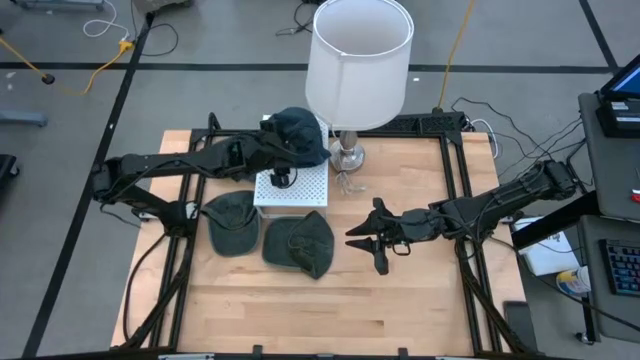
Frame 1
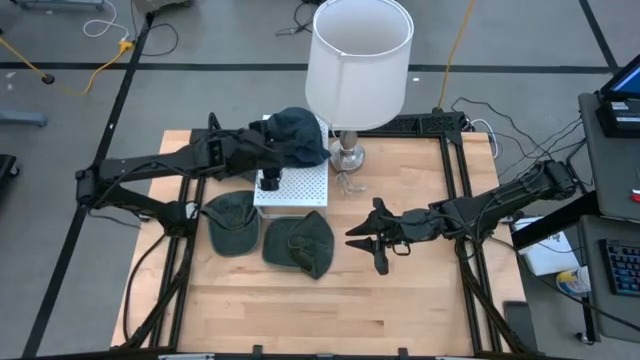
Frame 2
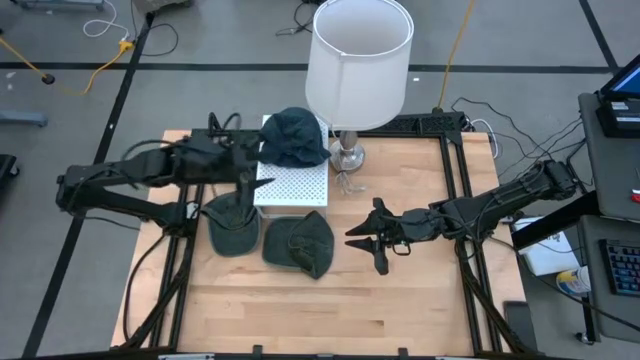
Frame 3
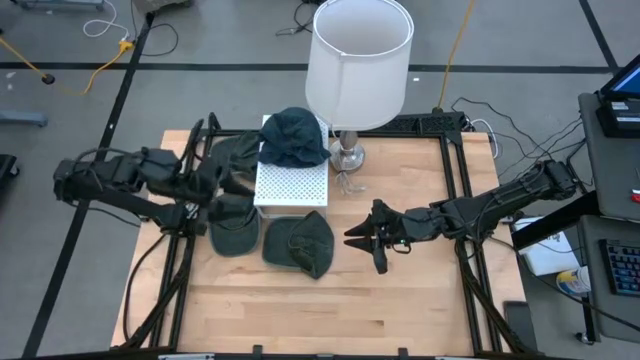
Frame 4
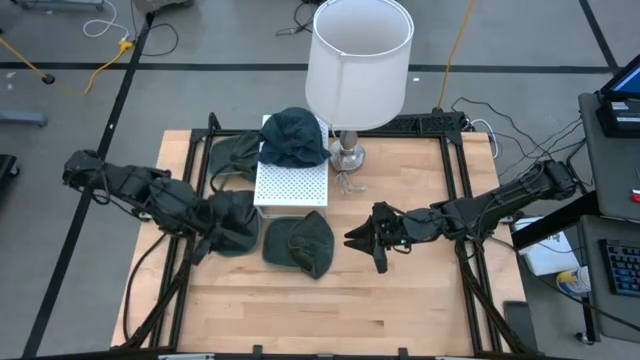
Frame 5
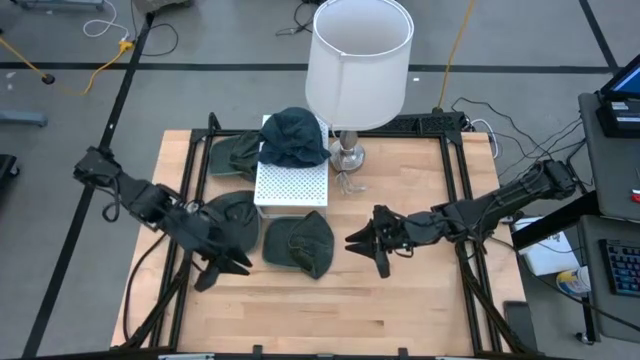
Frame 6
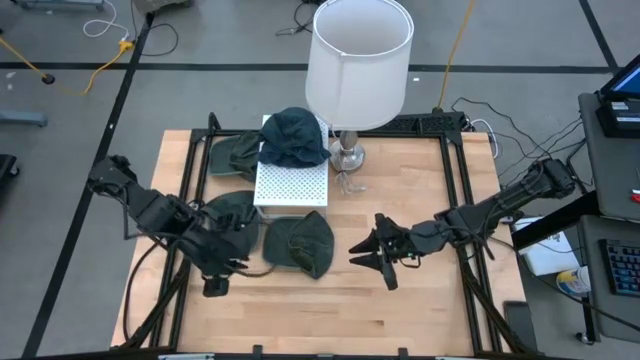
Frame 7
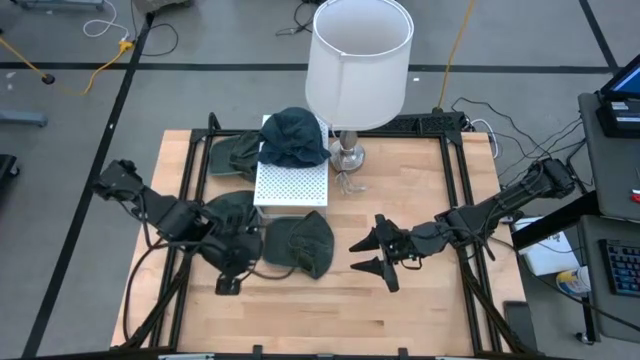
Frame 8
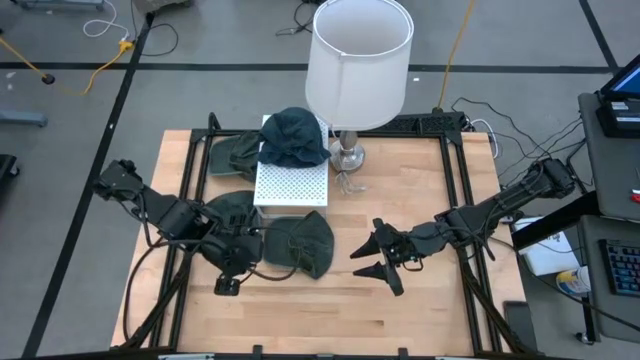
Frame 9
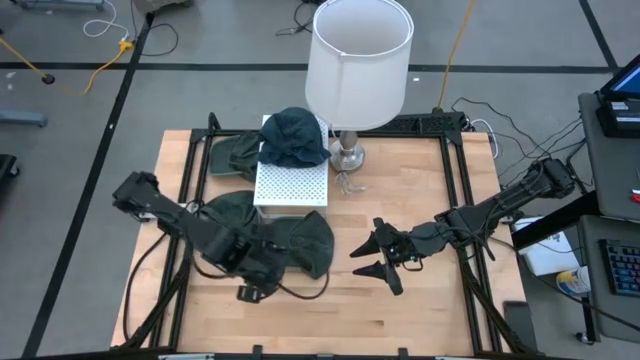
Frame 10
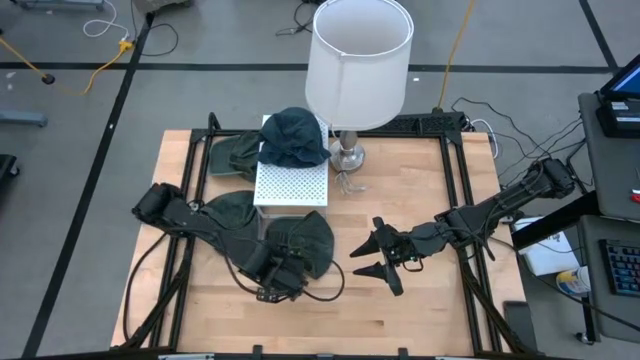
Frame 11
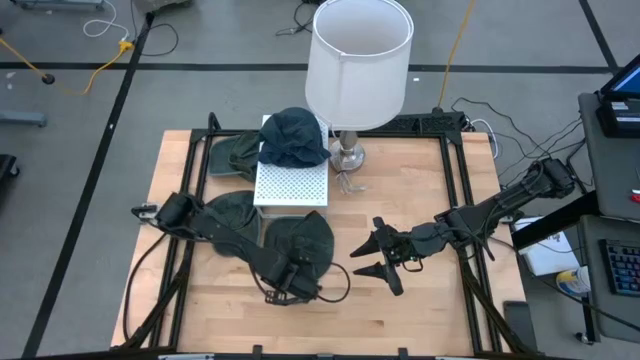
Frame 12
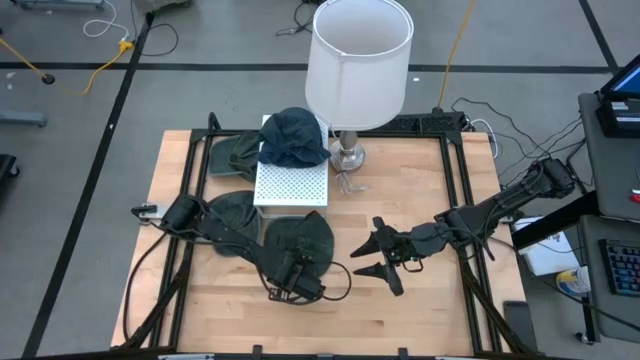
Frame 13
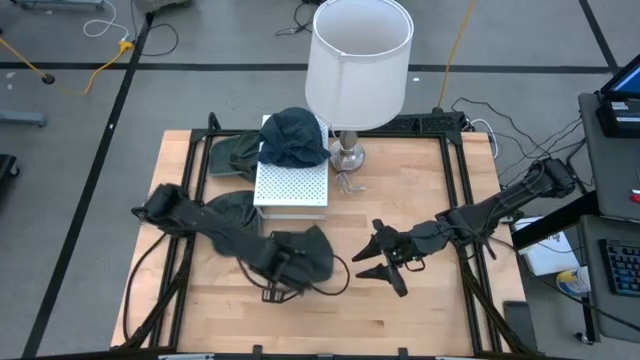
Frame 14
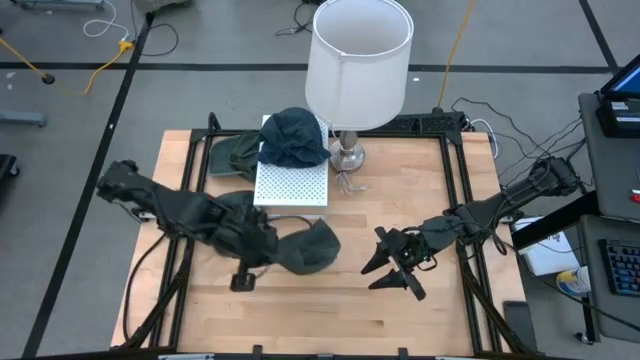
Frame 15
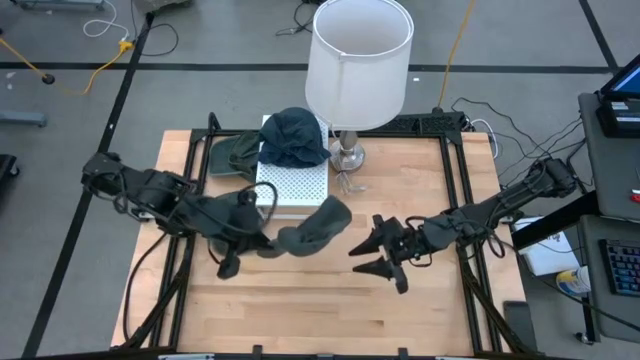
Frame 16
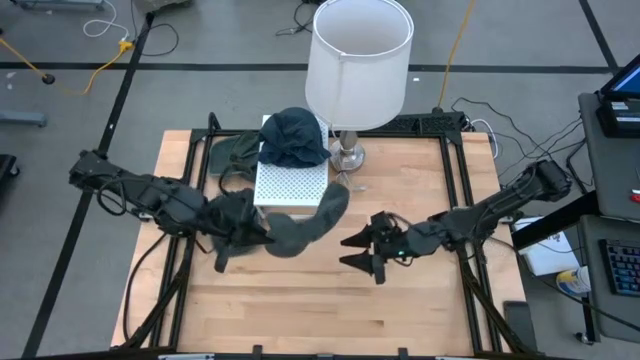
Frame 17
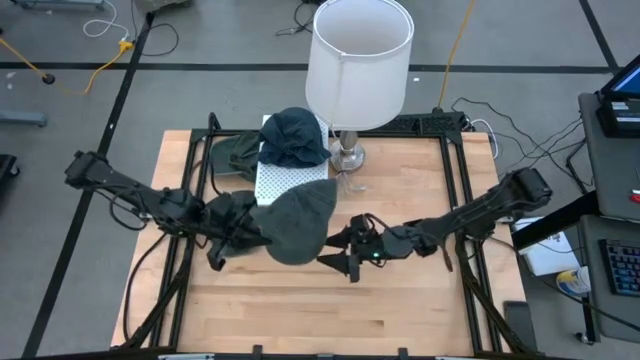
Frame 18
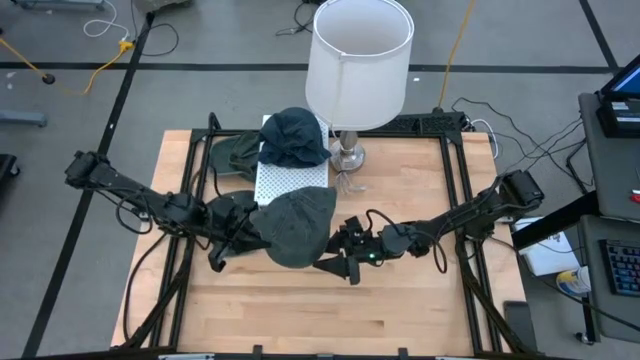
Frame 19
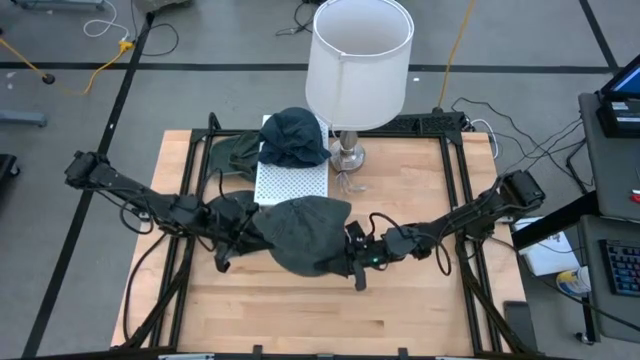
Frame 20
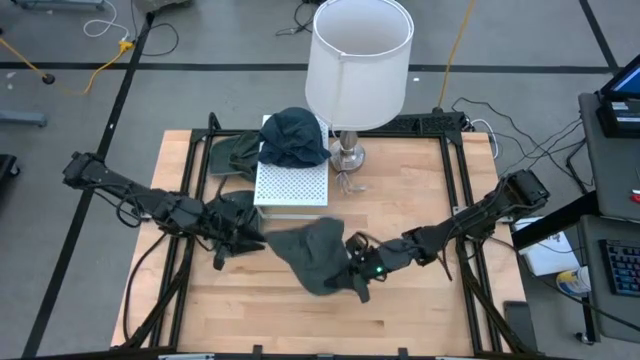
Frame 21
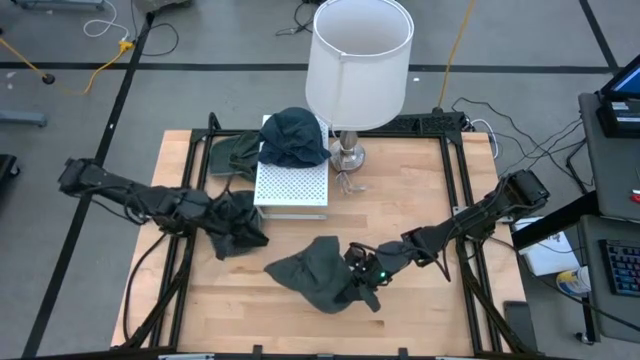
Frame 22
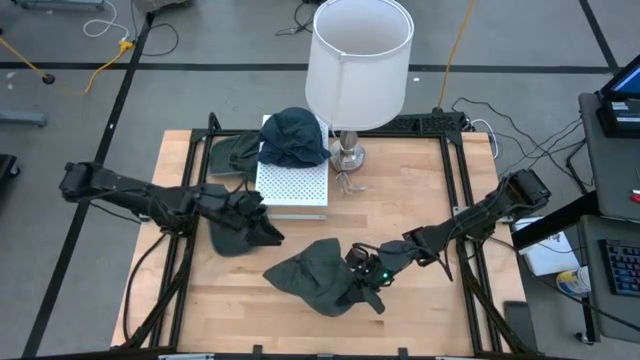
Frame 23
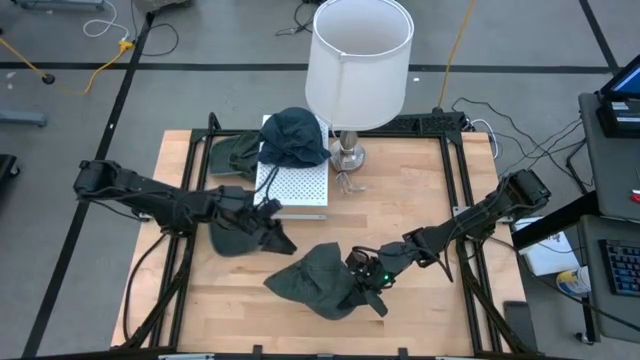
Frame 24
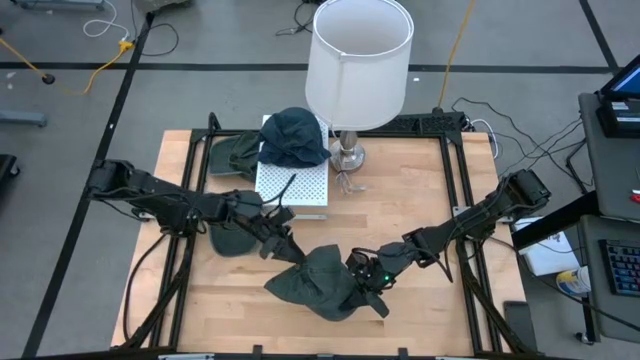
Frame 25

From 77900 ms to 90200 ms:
Task: Pick & Place hat
Put the bottom right gray cap on the shelf

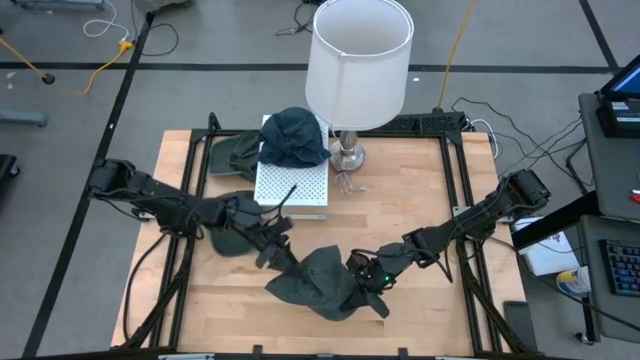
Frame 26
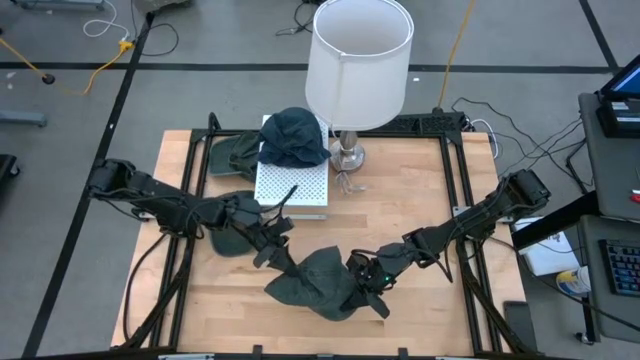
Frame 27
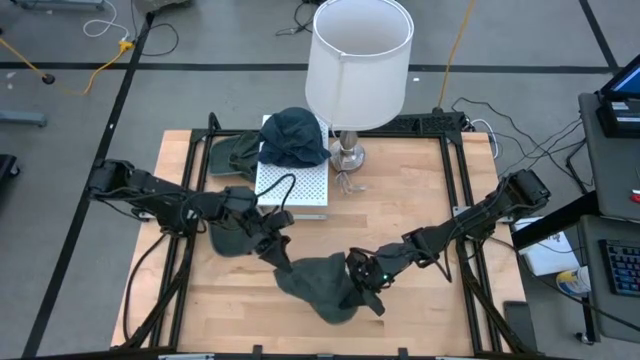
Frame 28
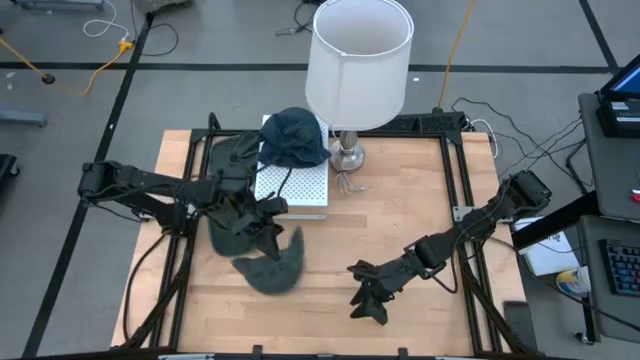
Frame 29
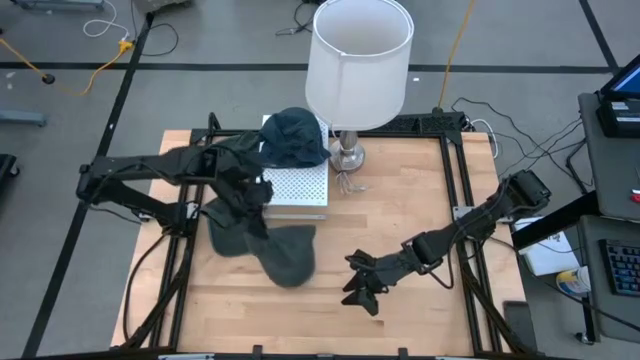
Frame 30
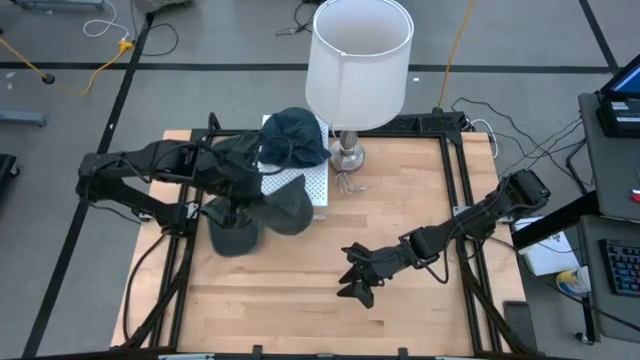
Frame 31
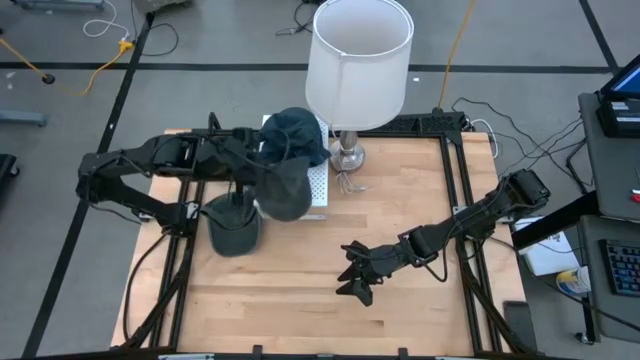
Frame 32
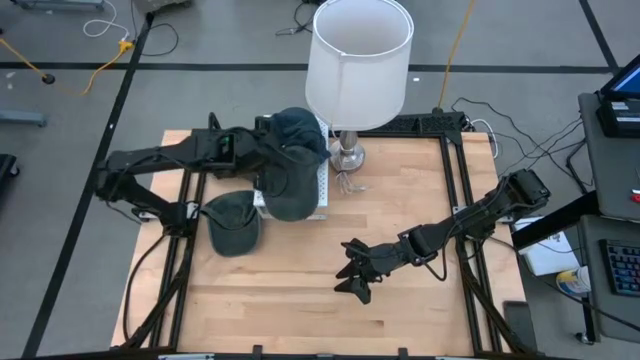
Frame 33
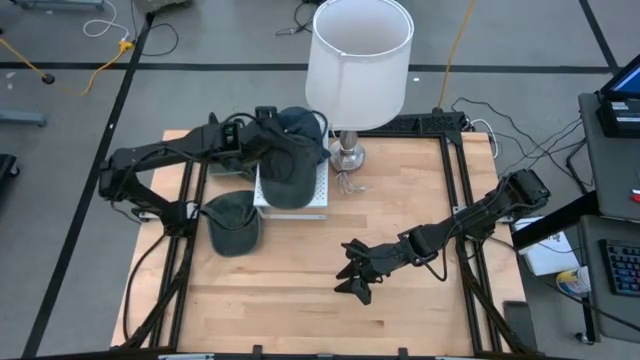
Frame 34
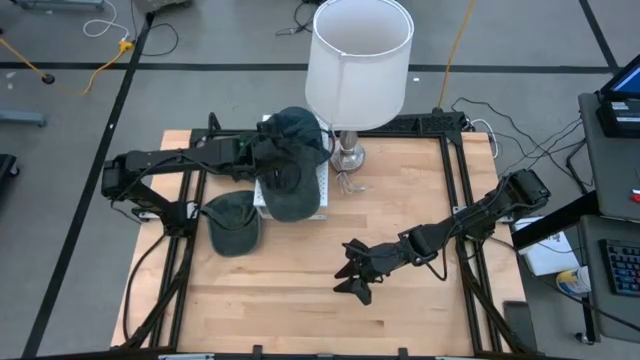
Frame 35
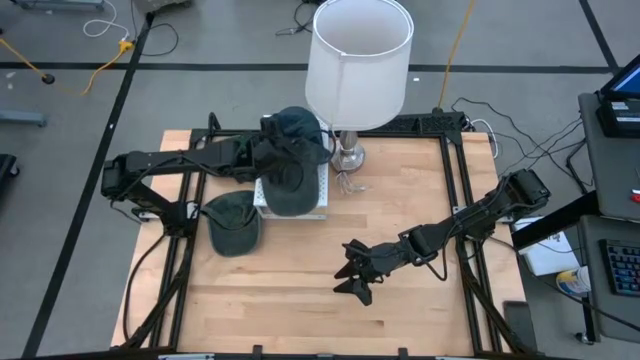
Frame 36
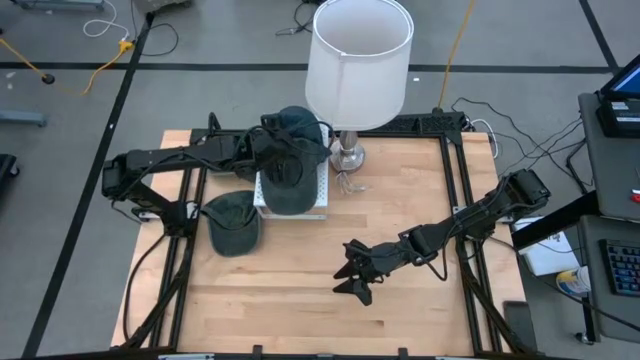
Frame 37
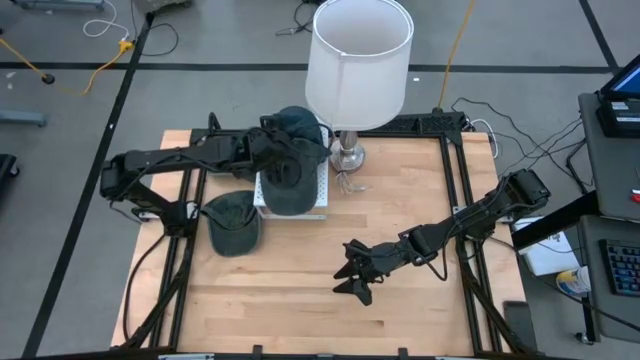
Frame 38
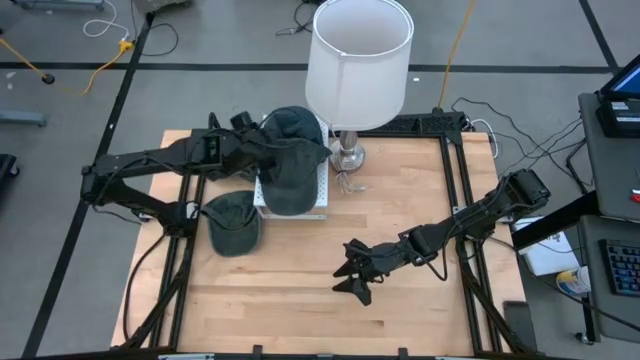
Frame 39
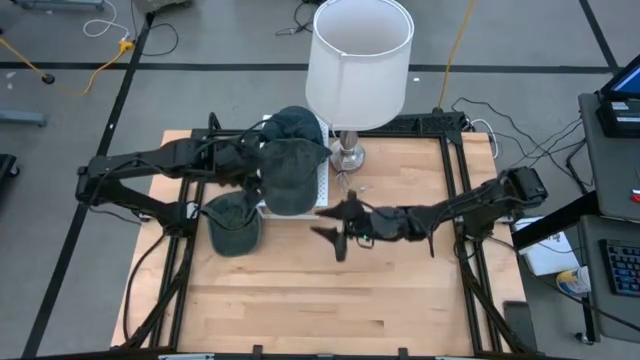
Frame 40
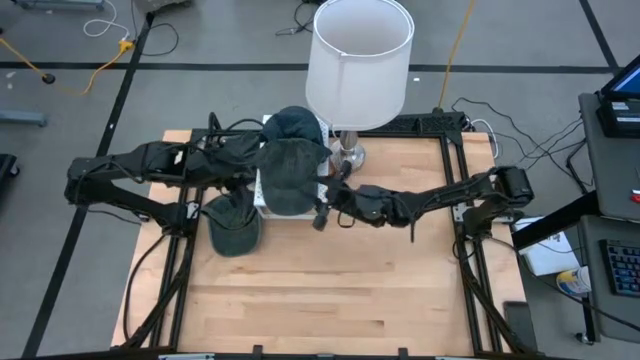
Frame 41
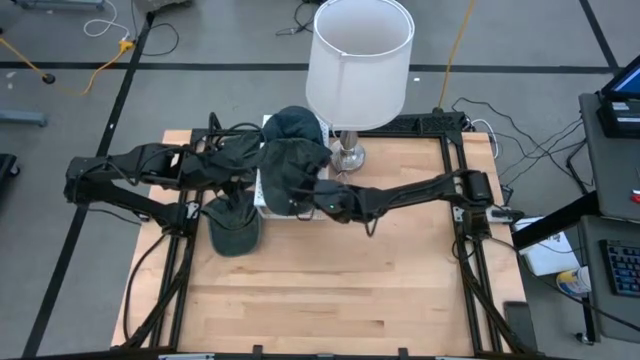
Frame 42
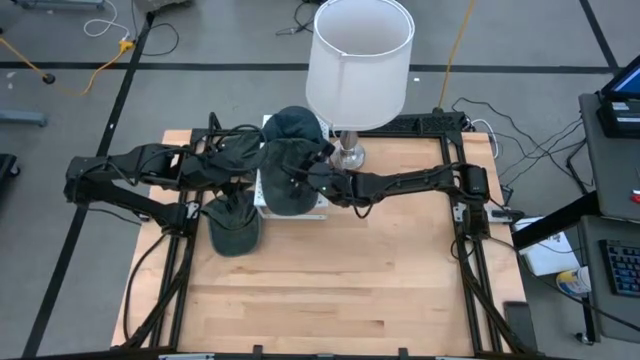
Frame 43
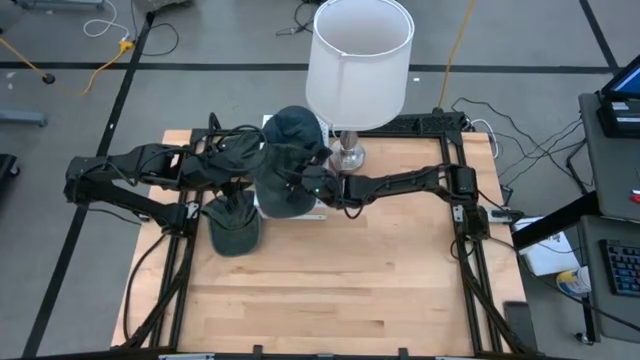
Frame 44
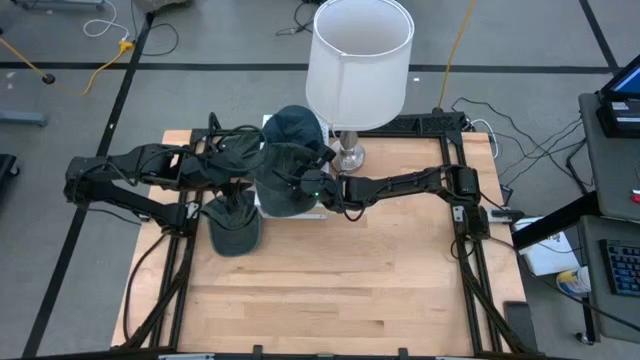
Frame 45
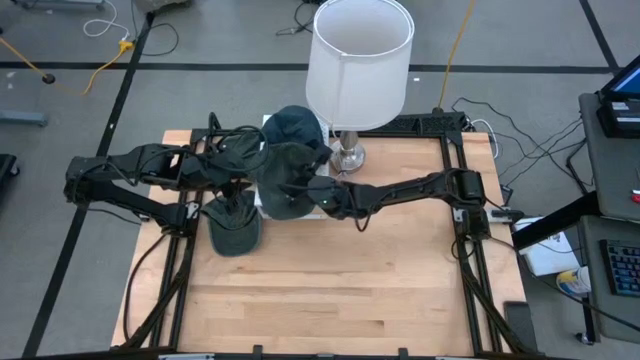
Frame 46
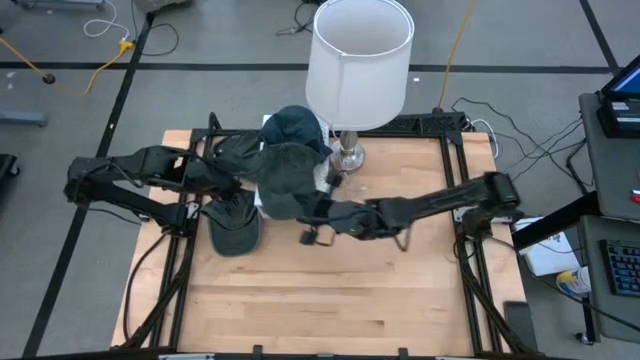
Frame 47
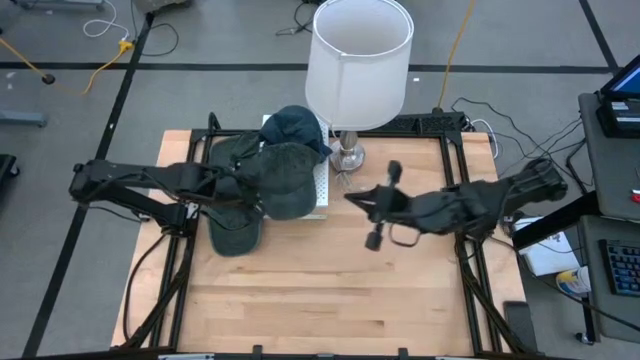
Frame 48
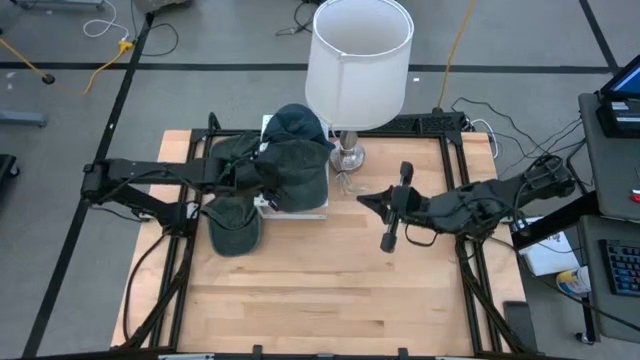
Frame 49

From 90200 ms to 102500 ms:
Put the bottom right gray cap on the shelf
